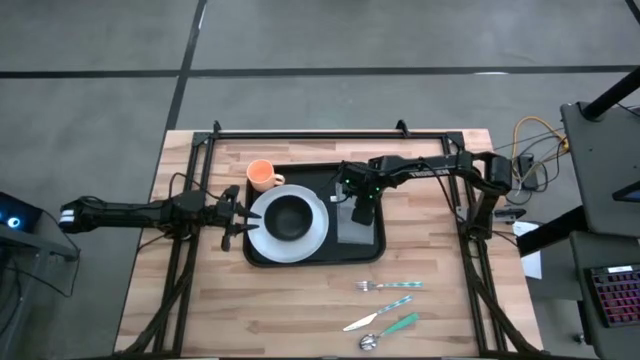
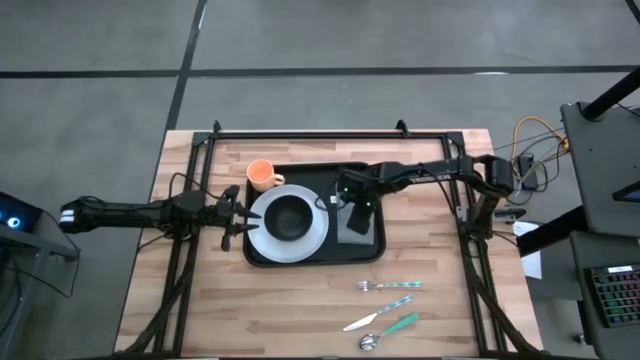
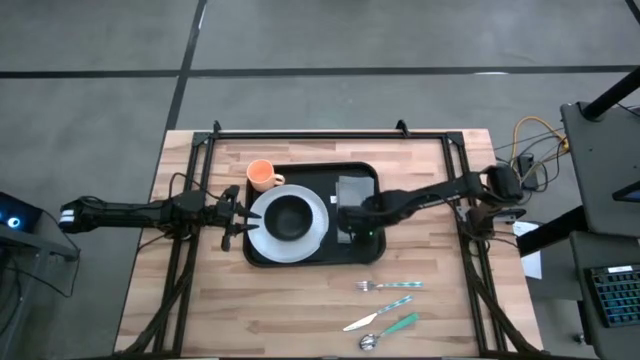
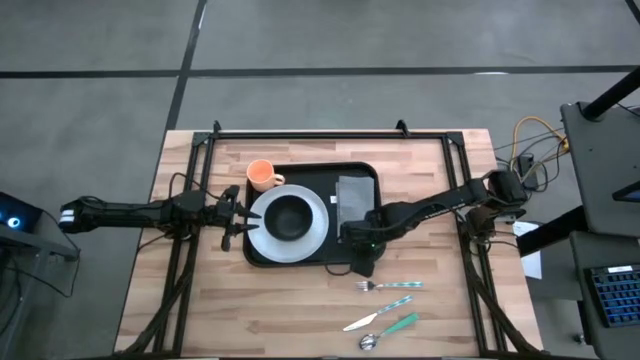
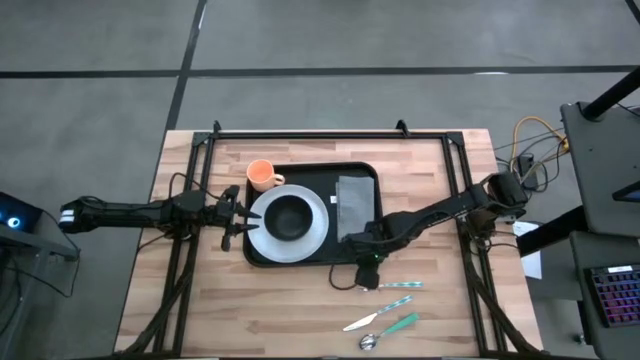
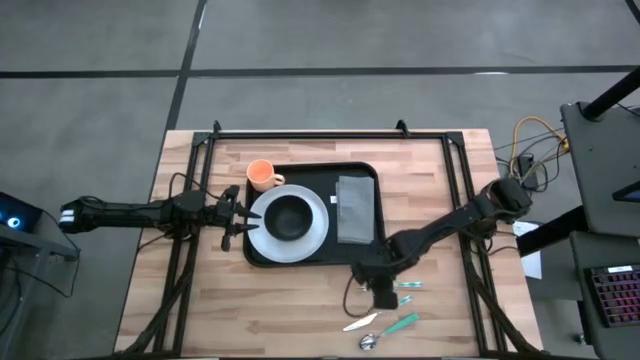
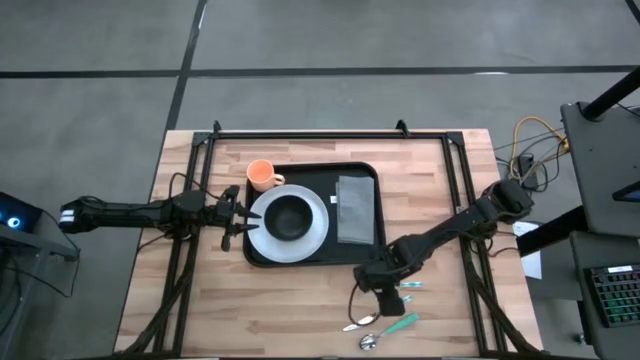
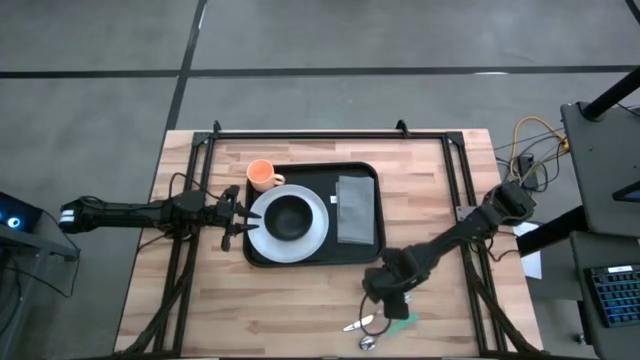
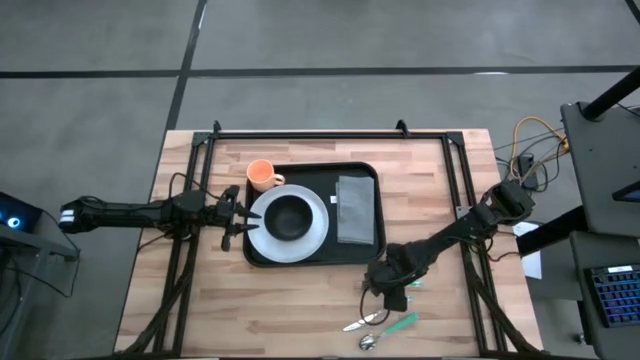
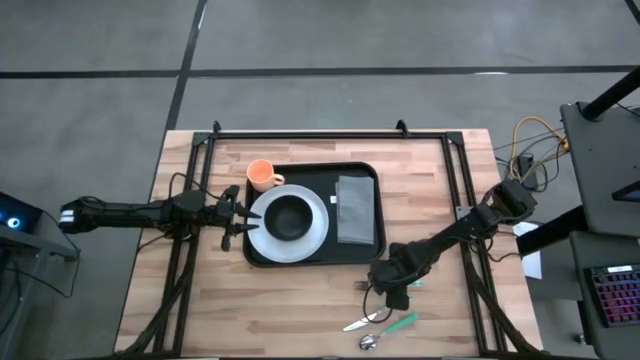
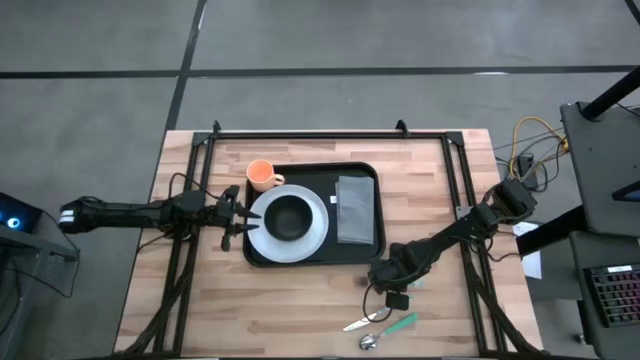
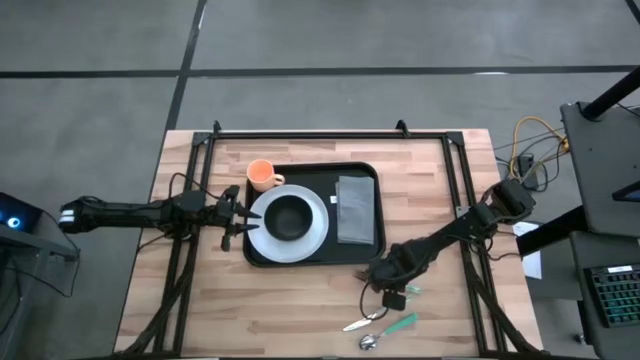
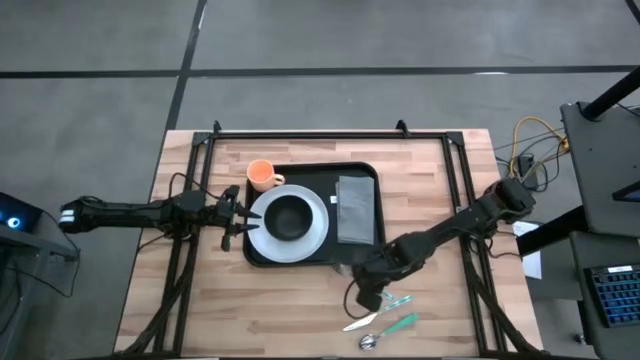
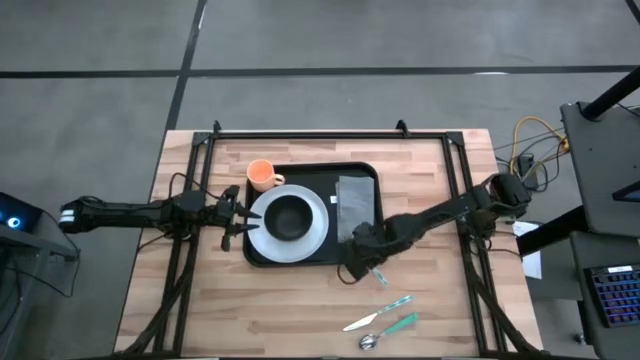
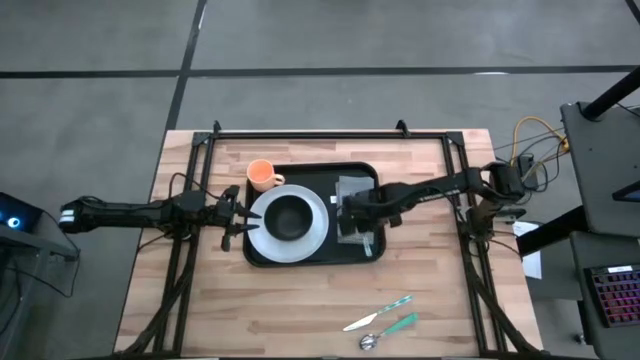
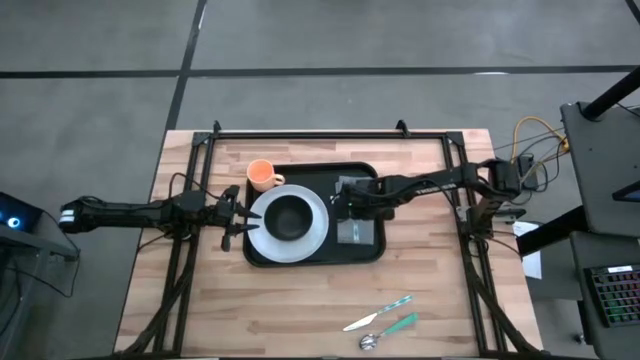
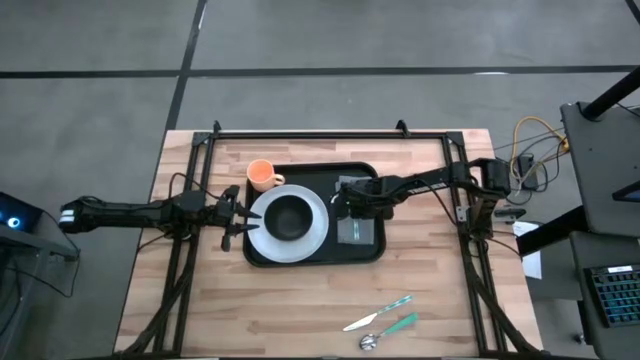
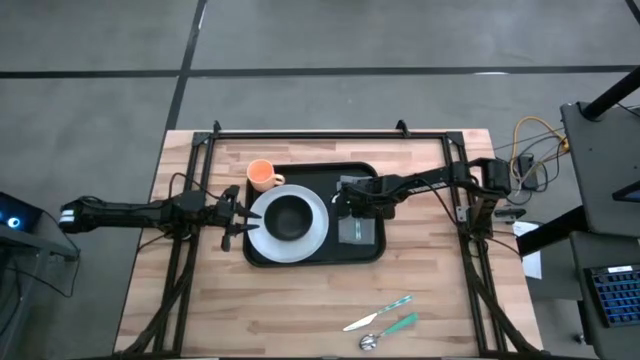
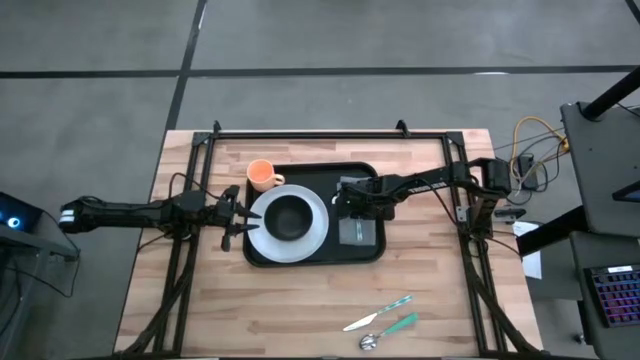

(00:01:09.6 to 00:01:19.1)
Task: Set up tray
Put the blue fork on the gray napkin

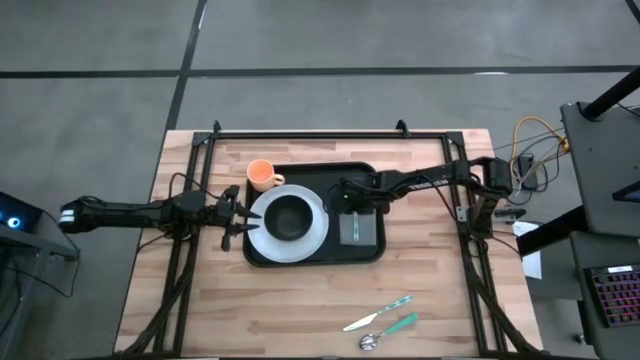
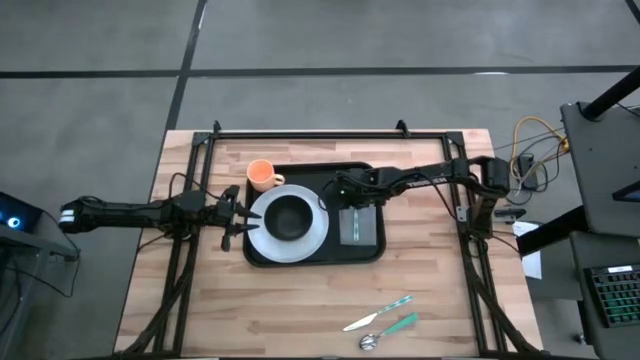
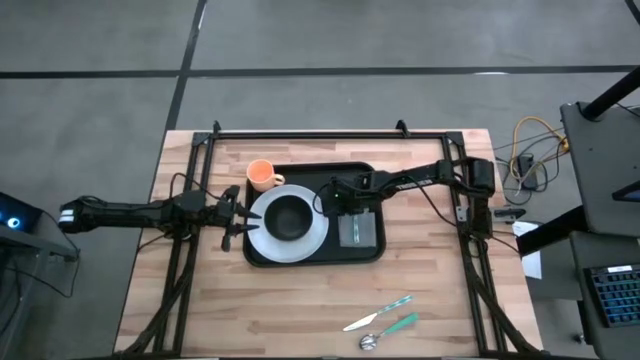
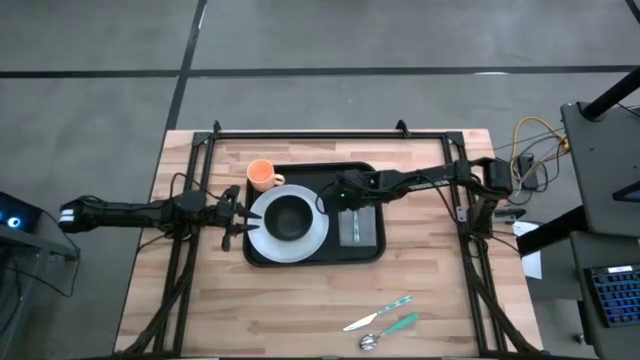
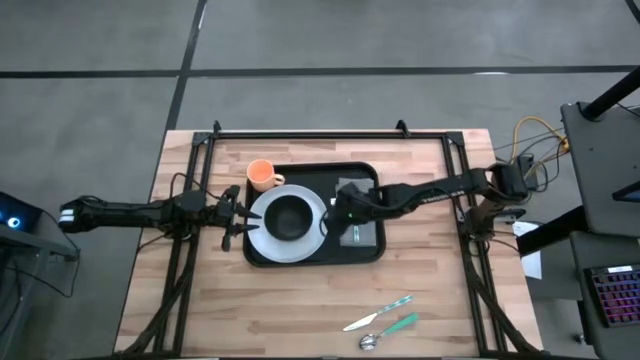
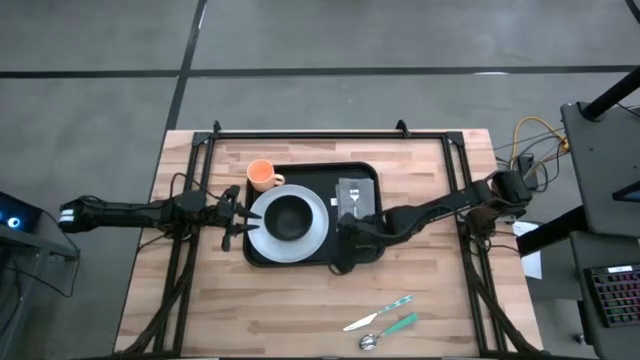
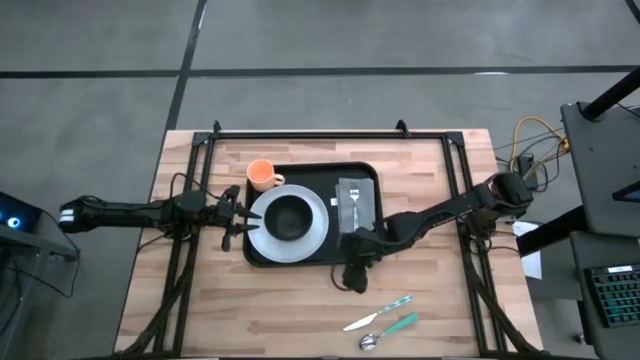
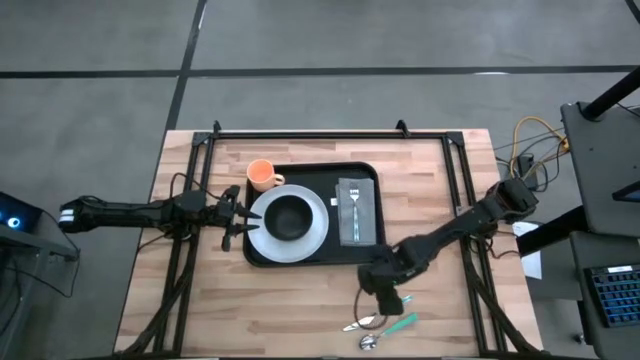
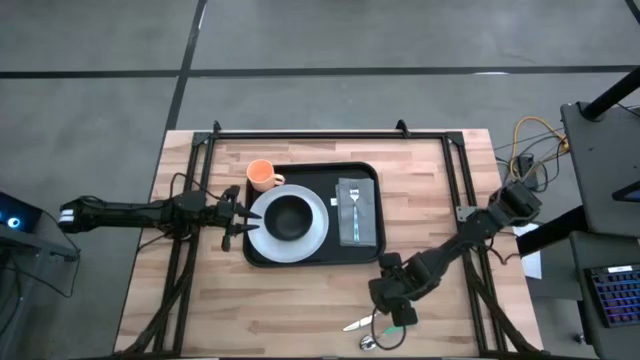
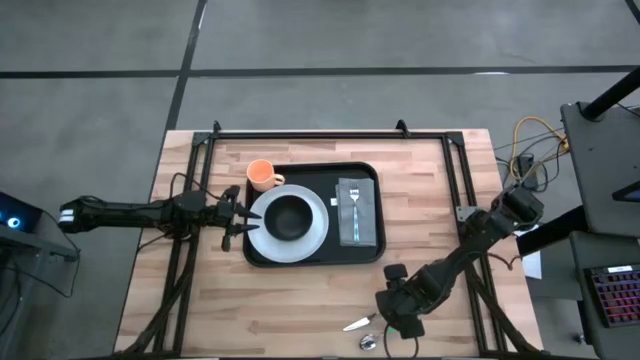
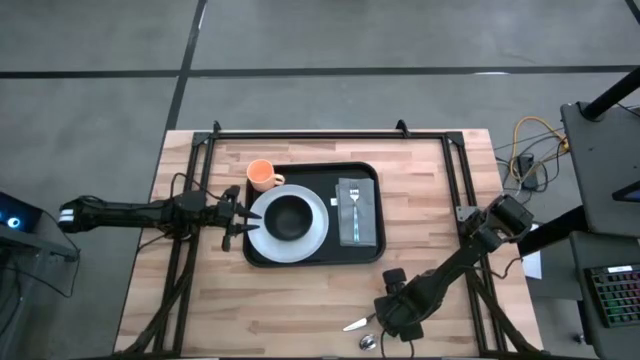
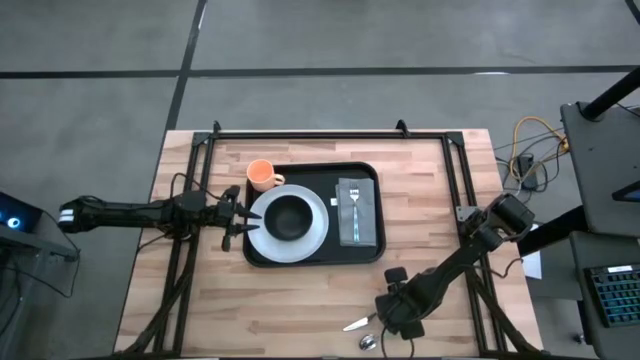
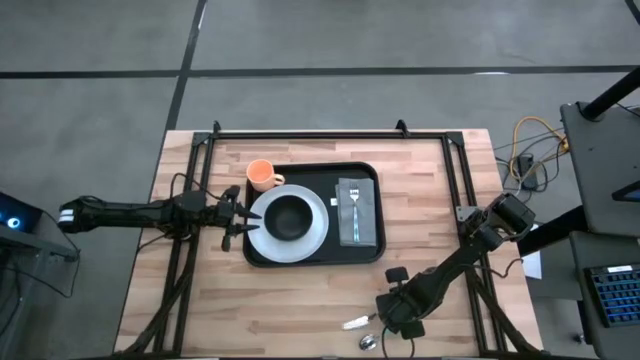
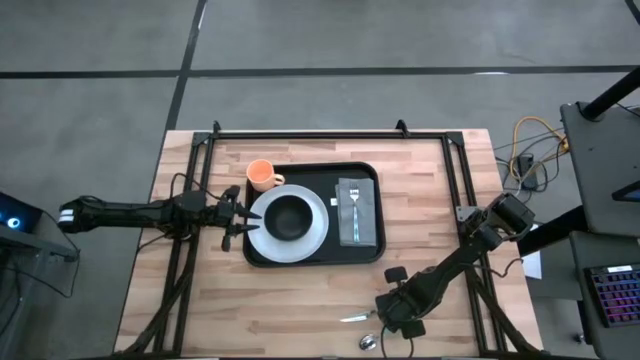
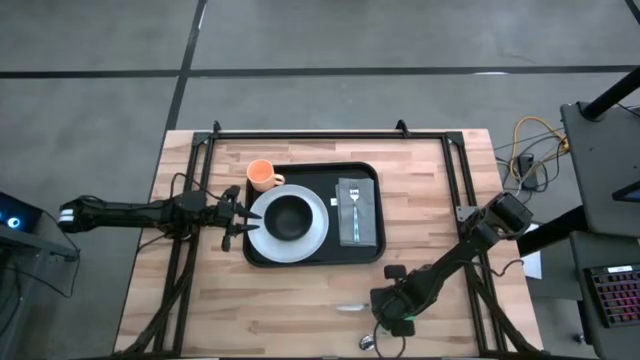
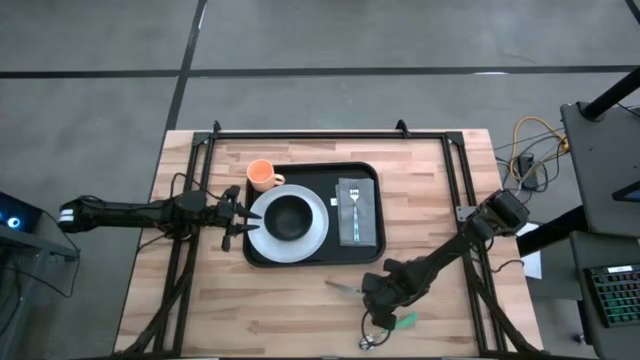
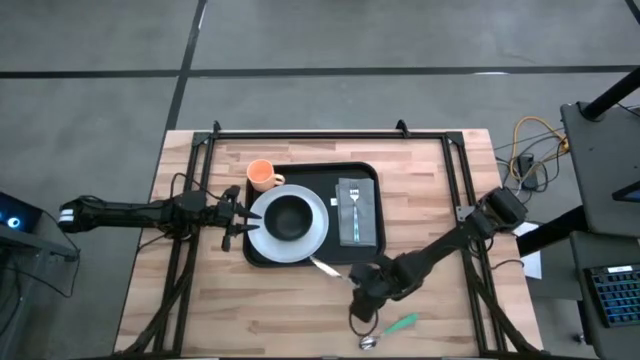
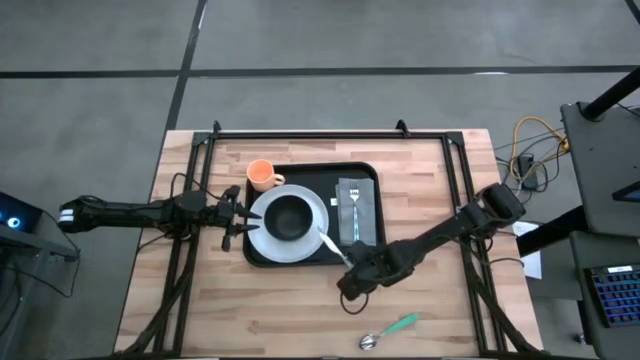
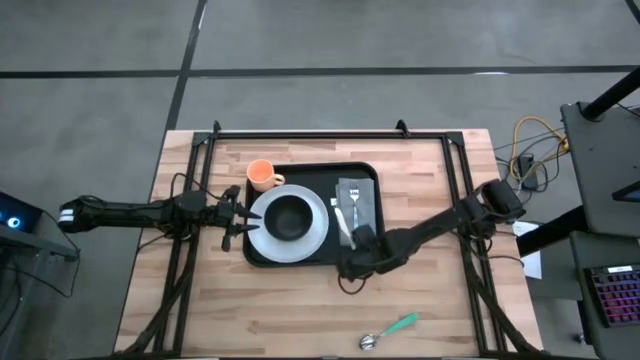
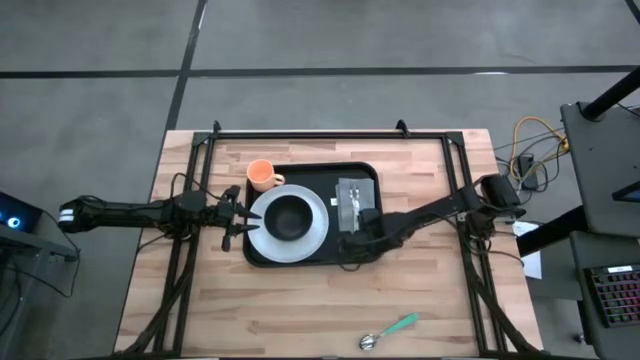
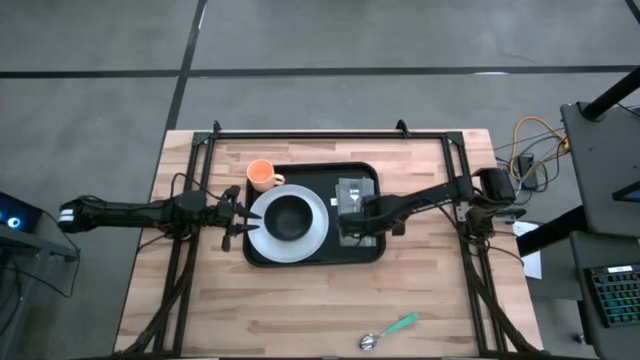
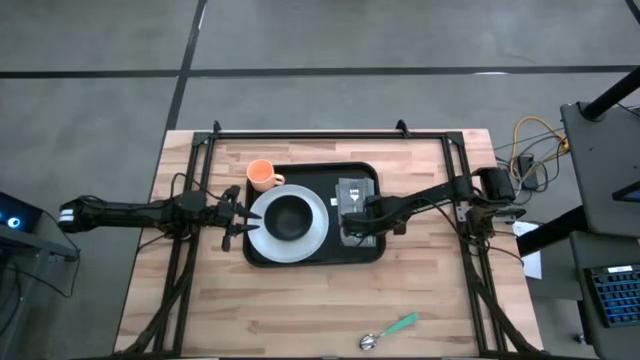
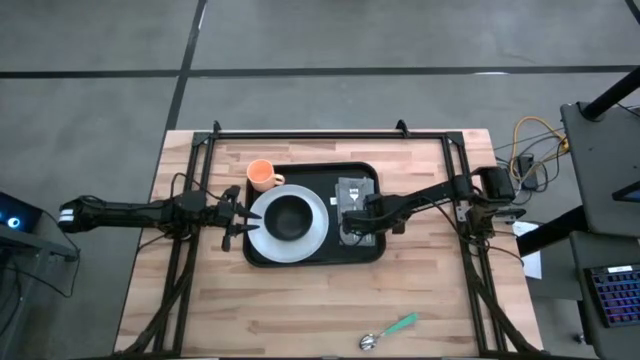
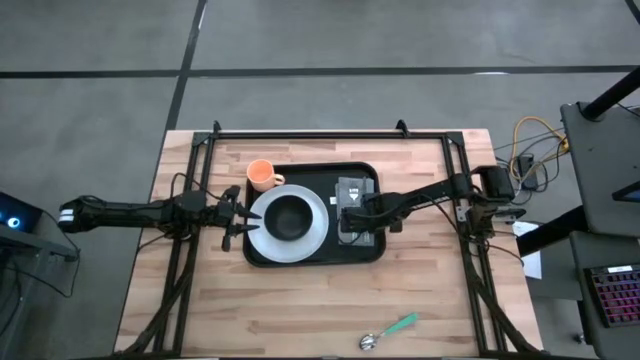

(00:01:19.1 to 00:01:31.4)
Put the blue knife on the gray napkin
